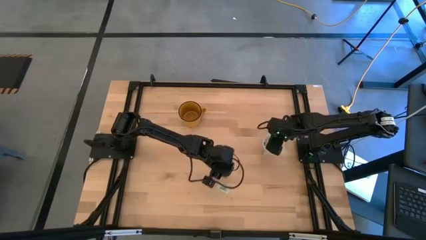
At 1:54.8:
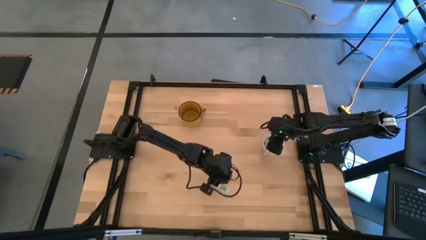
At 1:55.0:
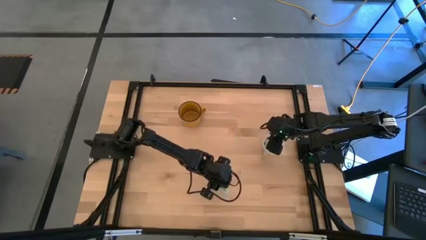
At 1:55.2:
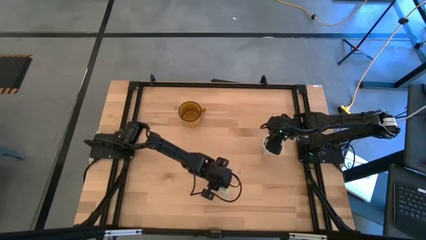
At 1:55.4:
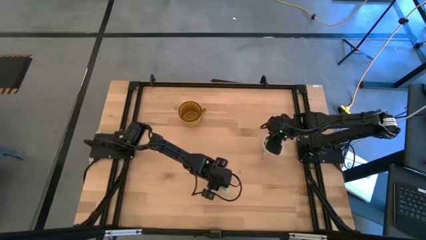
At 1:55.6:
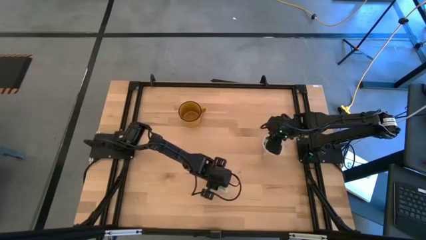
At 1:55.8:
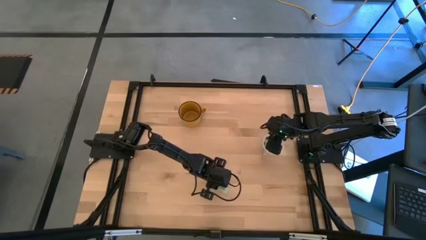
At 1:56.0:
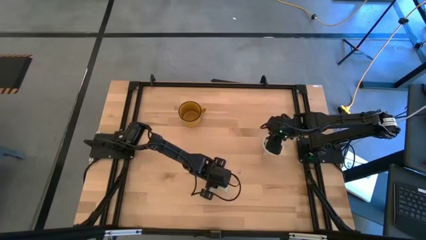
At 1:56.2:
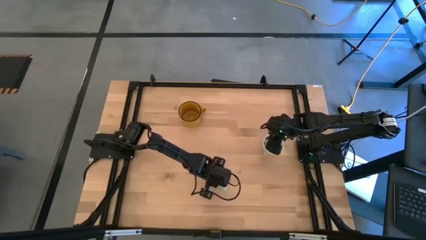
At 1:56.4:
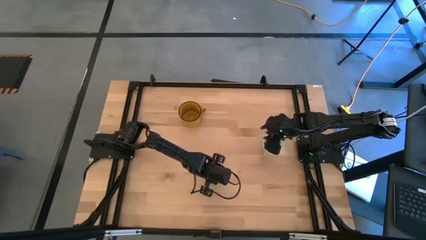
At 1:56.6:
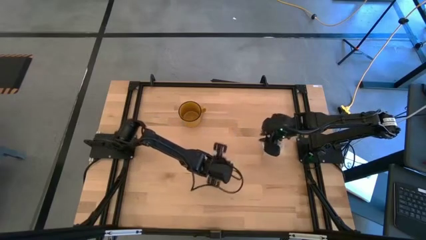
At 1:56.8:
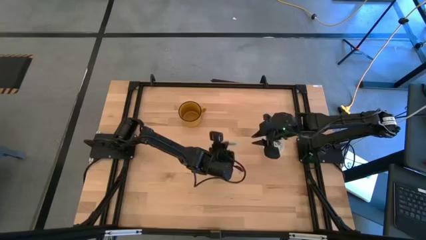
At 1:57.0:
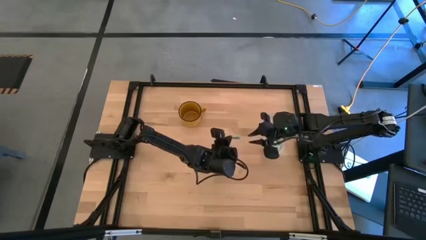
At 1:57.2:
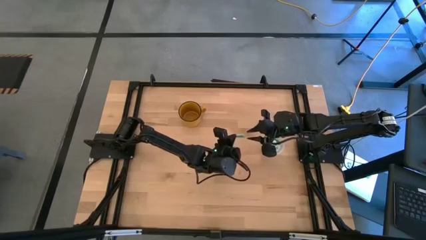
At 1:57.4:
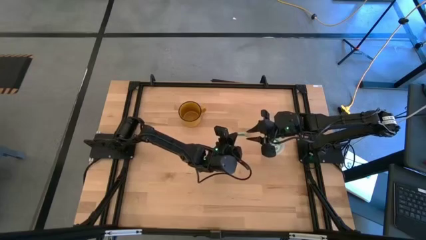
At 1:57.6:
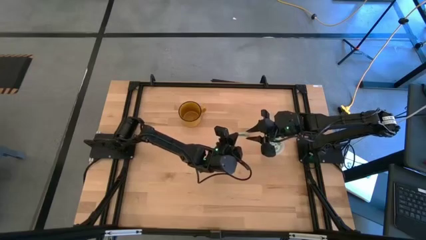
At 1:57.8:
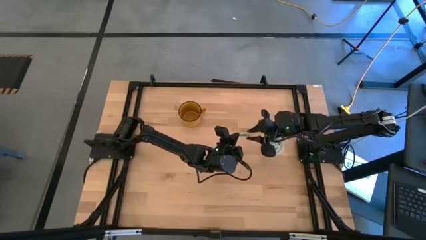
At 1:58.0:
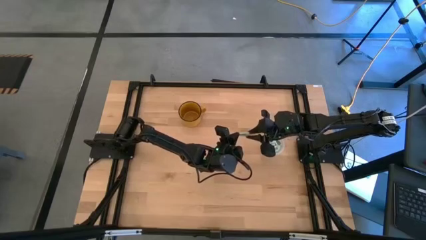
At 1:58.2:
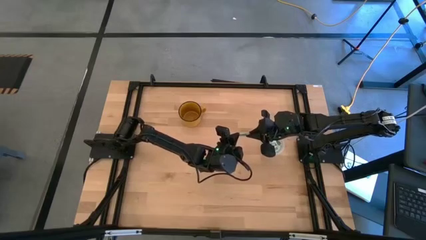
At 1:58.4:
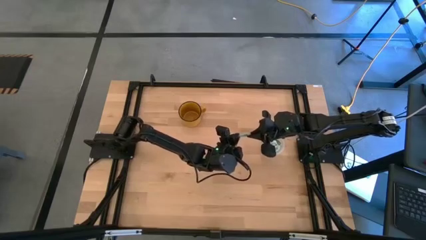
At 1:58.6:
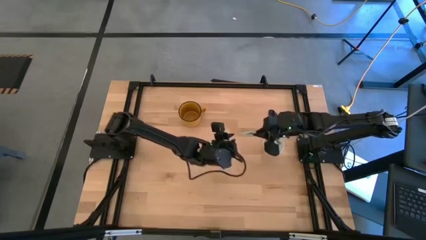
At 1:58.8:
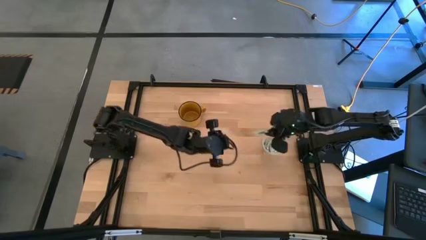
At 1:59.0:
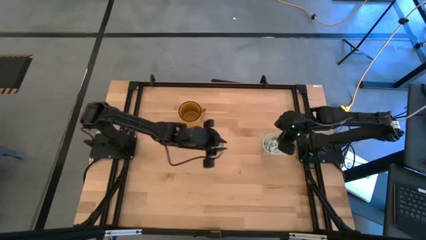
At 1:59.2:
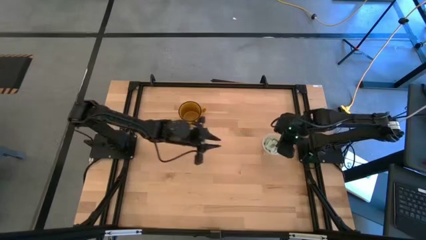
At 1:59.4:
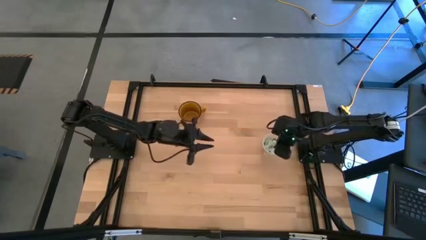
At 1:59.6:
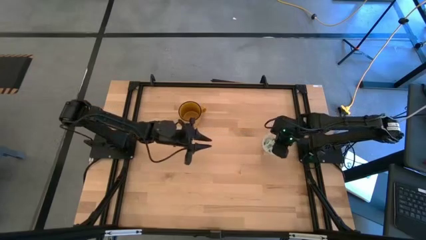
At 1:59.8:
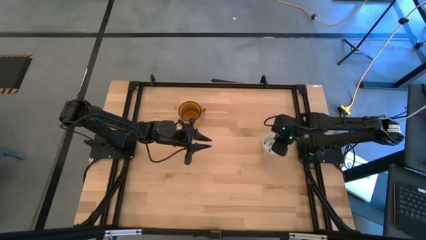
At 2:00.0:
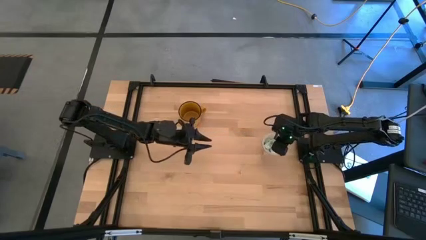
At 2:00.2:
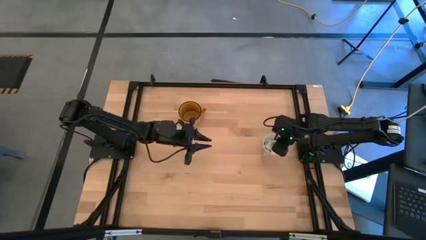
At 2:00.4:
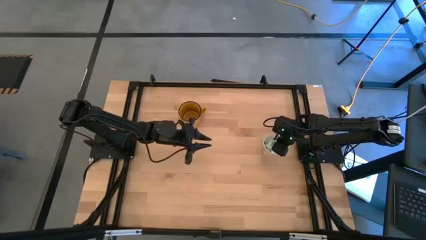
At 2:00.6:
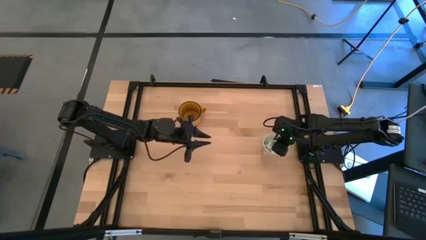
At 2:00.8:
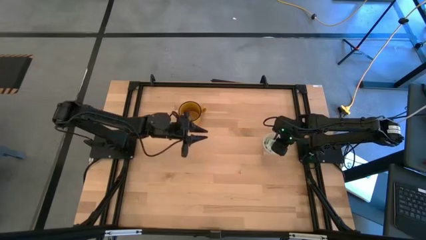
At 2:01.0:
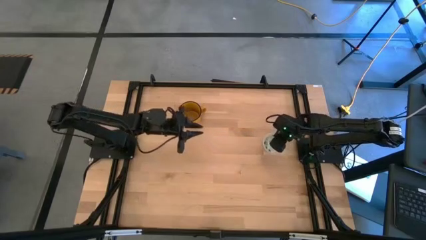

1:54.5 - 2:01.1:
Task: Pick and place items into bin
Put the stevia packet into the transparent bin

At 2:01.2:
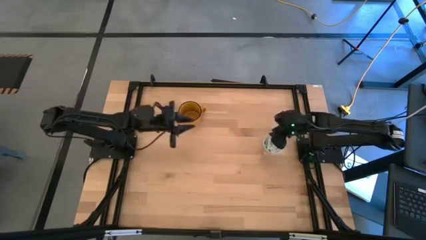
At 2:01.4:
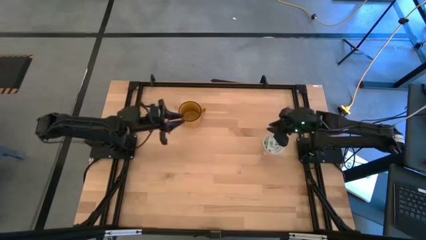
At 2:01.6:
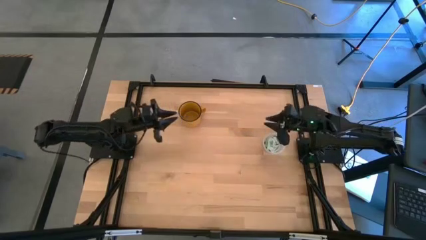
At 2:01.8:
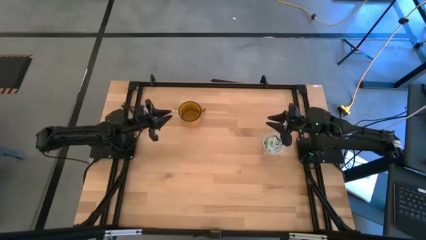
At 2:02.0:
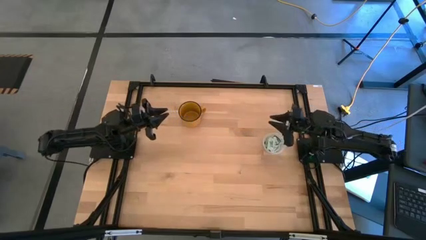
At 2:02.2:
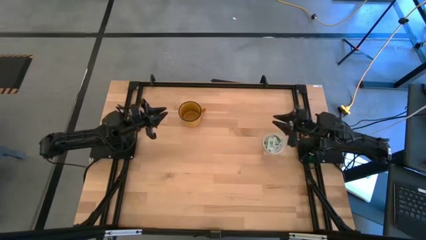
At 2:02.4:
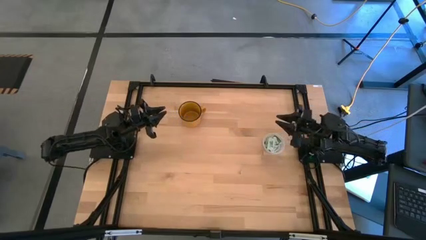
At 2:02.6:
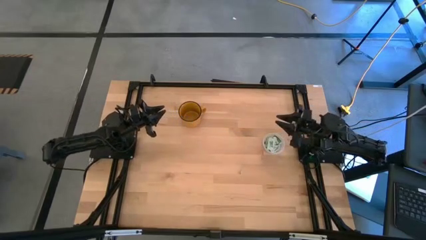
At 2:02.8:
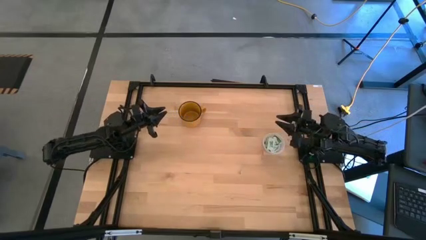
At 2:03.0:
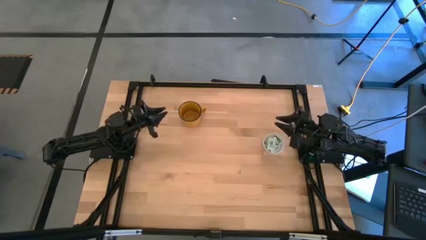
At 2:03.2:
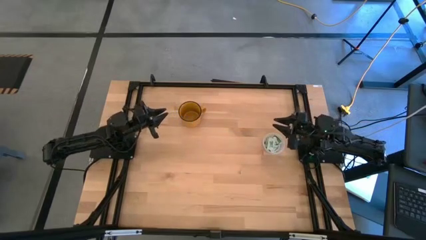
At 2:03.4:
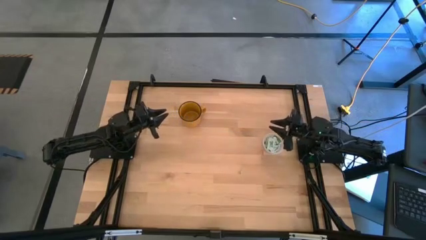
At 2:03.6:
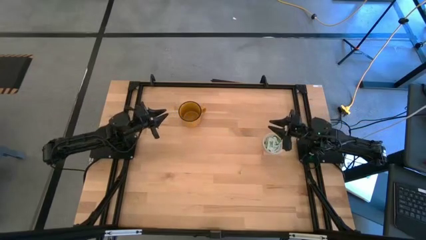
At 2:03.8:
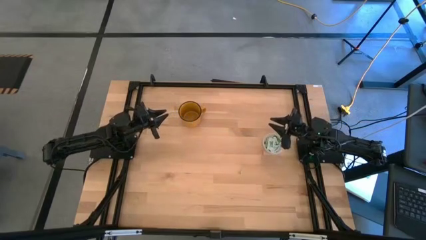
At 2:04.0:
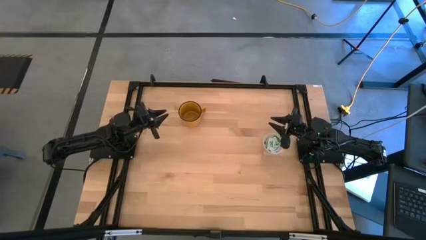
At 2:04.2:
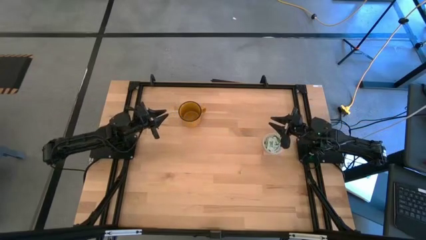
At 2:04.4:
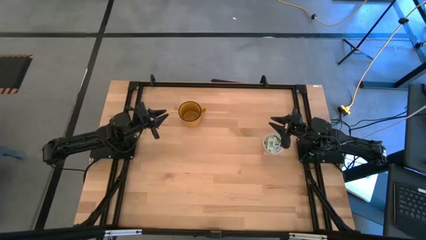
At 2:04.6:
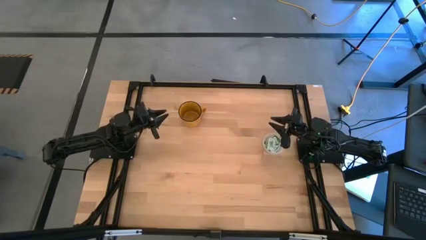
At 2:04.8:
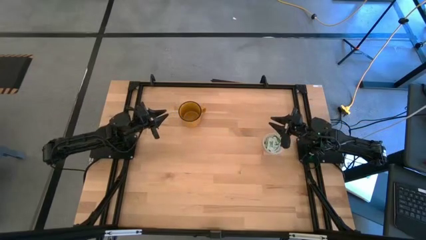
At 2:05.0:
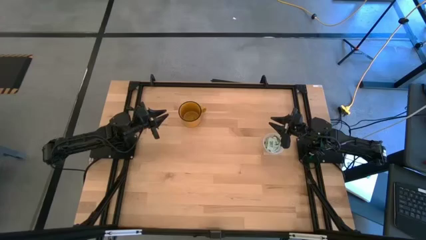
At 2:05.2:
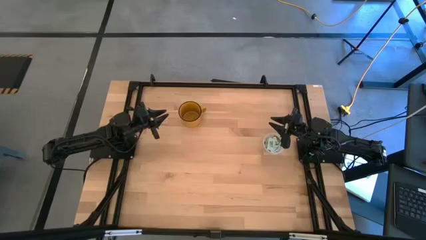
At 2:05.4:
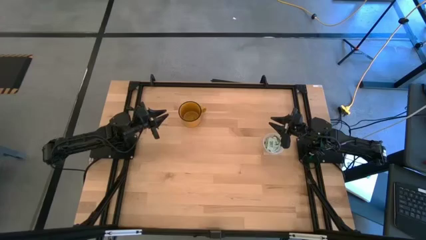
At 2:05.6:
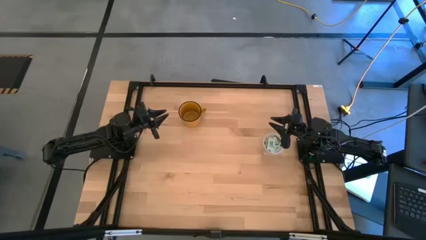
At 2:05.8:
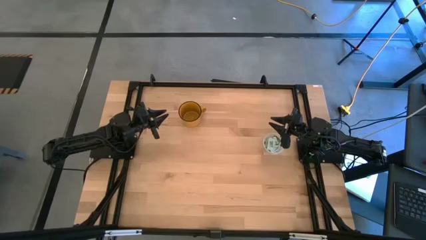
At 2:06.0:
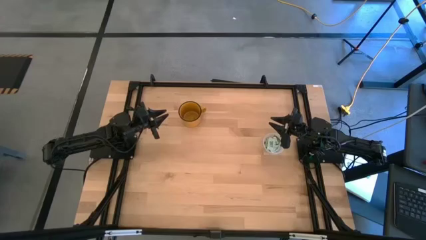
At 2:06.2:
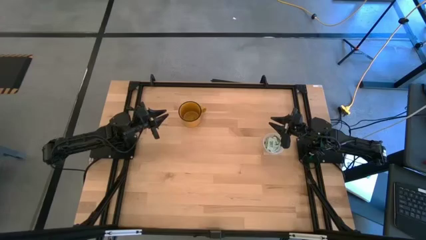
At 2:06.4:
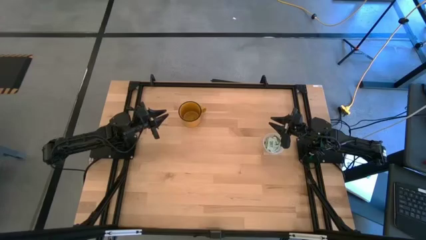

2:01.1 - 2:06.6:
Return to Home Position

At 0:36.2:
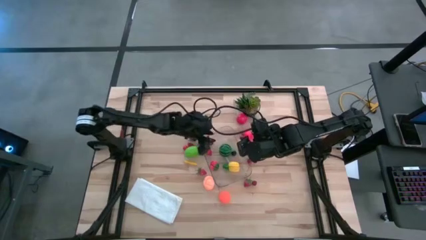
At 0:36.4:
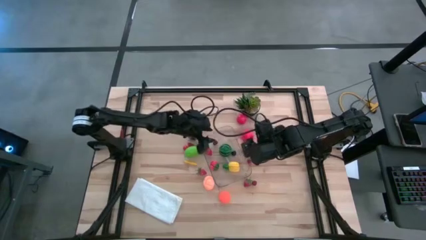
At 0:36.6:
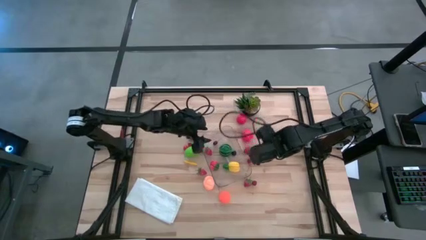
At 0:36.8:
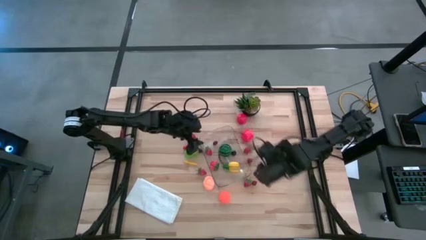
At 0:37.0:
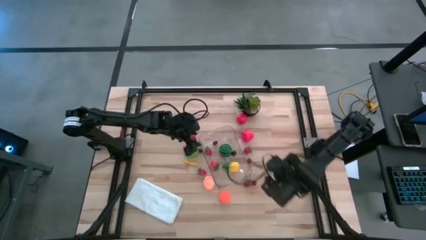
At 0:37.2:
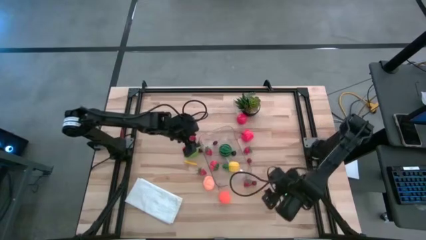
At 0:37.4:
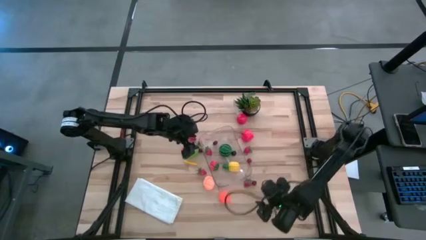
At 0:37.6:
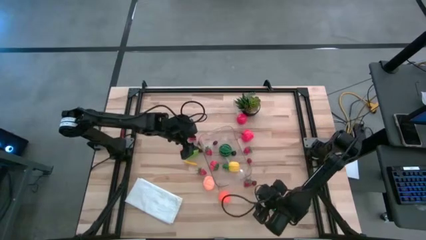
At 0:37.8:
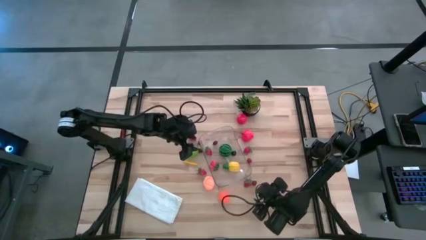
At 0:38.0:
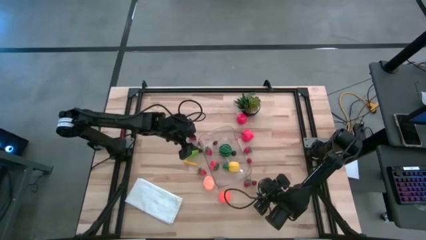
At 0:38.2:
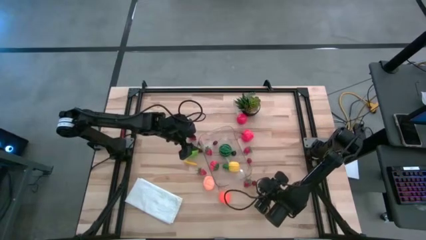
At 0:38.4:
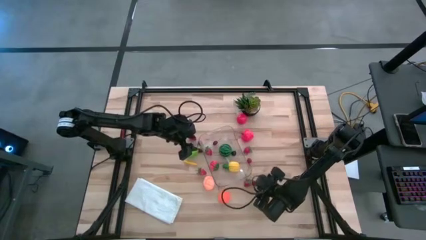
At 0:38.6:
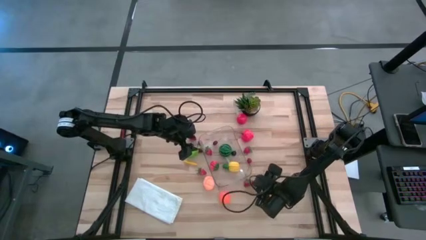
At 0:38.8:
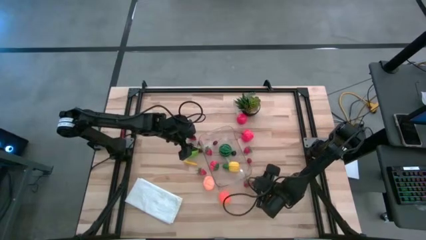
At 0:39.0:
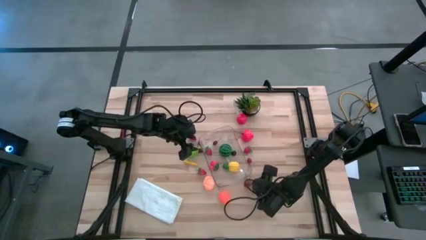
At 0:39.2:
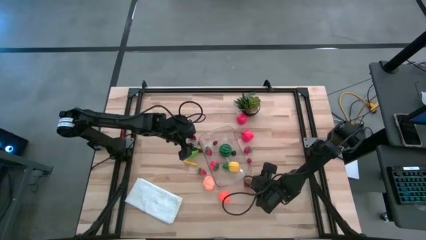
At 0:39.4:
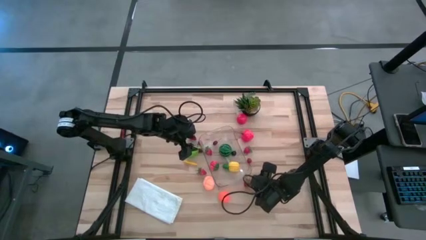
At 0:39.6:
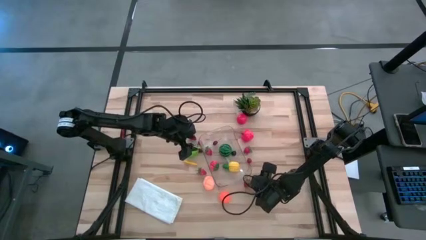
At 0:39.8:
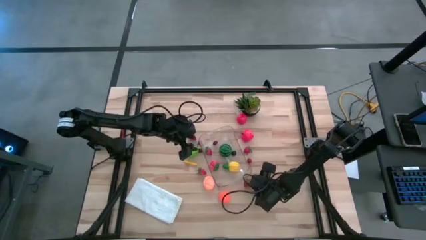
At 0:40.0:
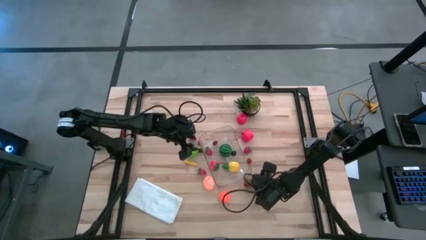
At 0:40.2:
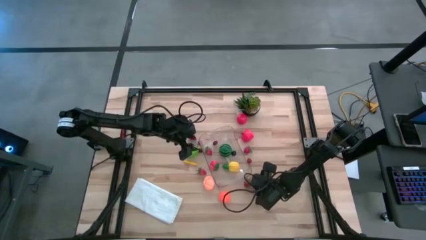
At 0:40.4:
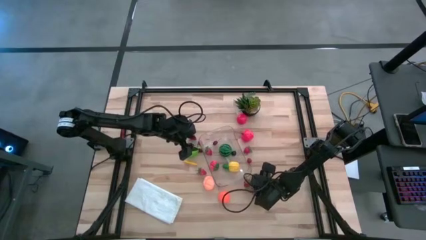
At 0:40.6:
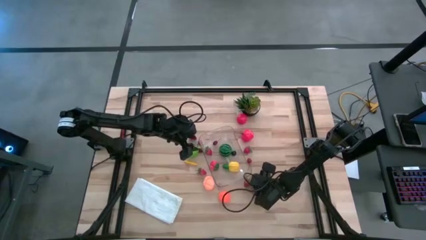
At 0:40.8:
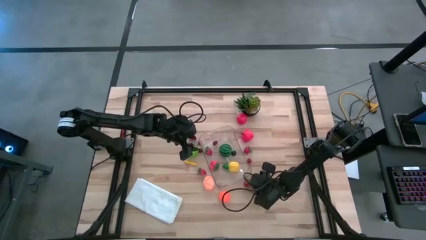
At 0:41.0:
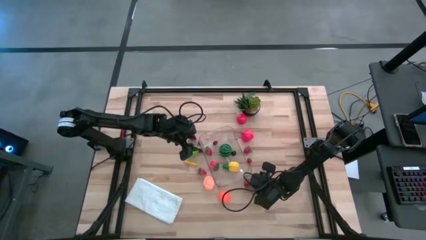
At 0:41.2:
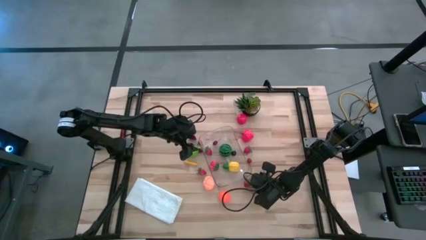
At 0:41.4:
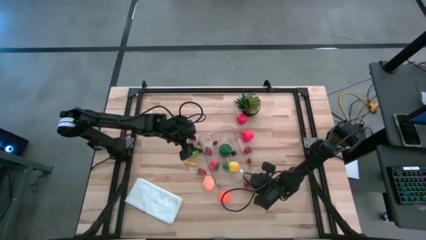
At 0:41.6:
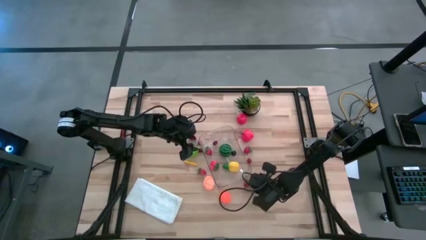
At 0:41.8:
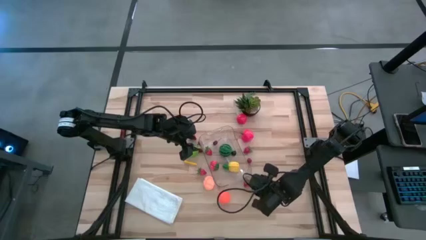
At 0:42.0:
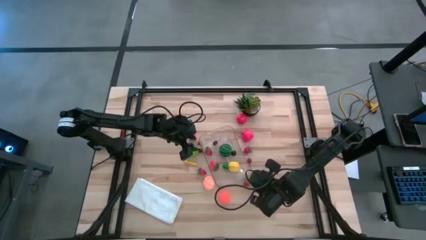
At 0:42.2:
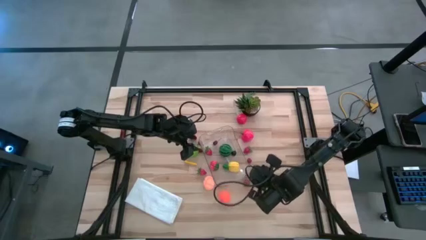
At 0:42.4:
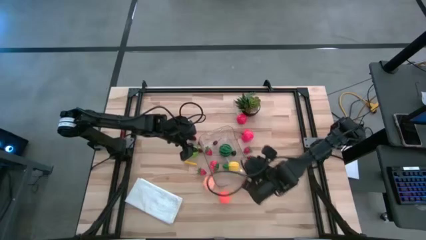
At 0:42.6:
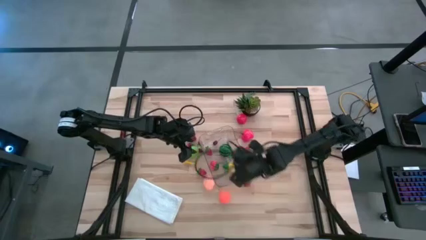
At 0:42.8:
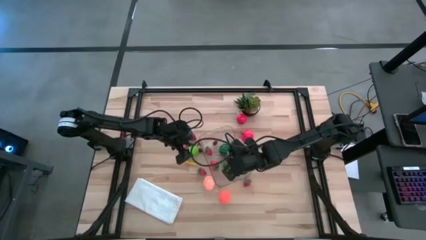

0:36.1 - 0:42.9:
Task: Pick and placing Produce into tupperware
Put the red cherry into the transparent bin
